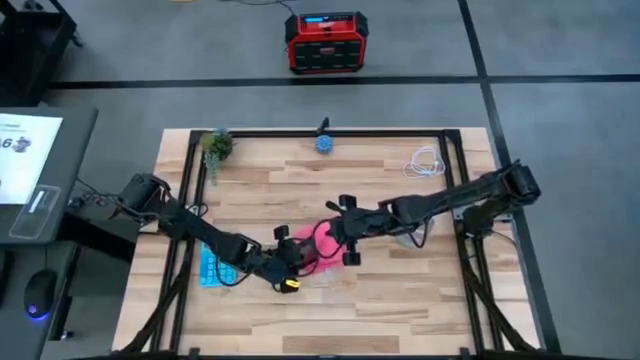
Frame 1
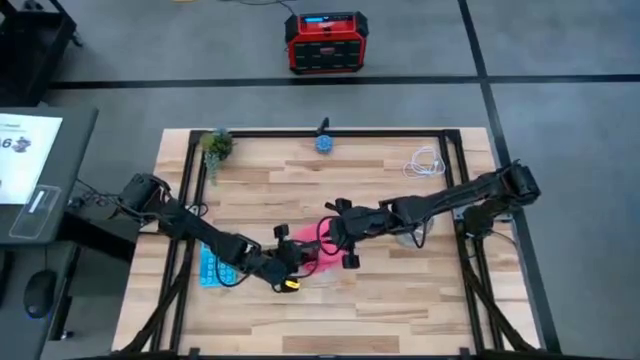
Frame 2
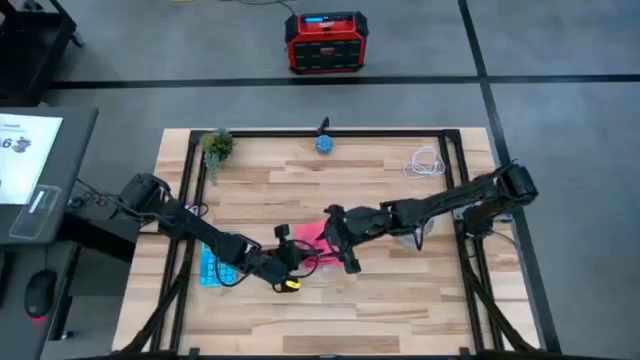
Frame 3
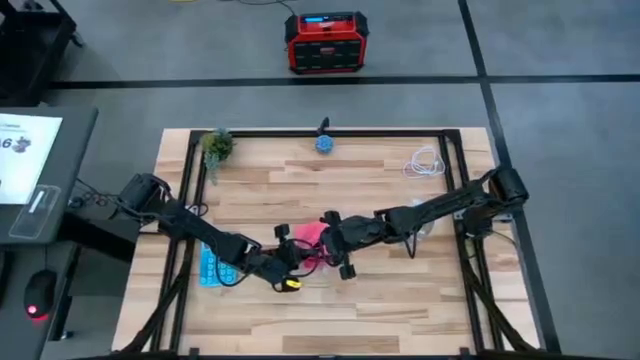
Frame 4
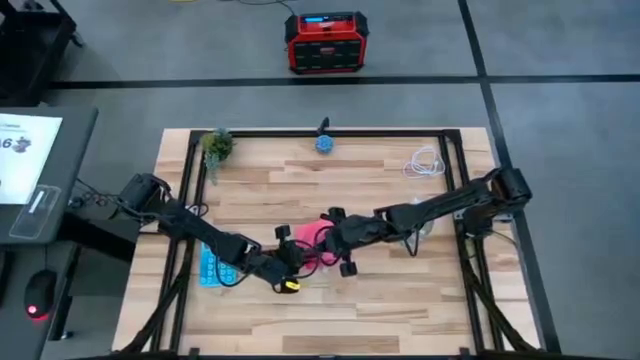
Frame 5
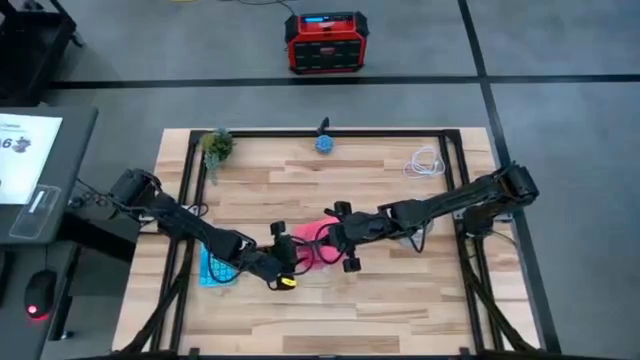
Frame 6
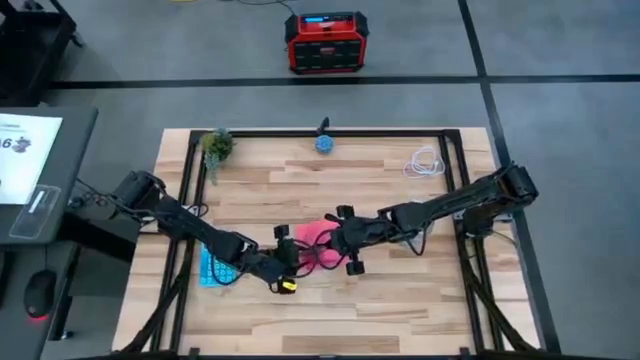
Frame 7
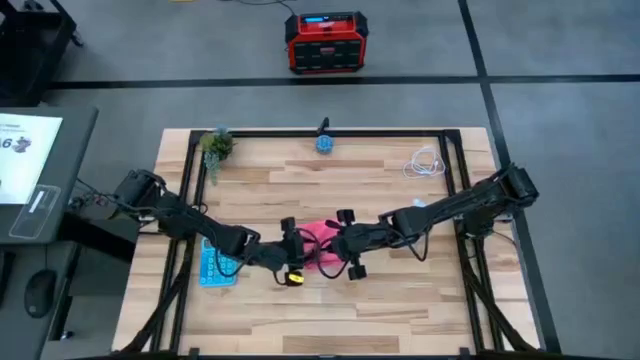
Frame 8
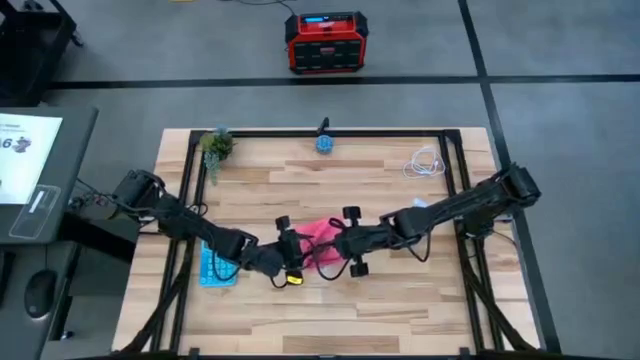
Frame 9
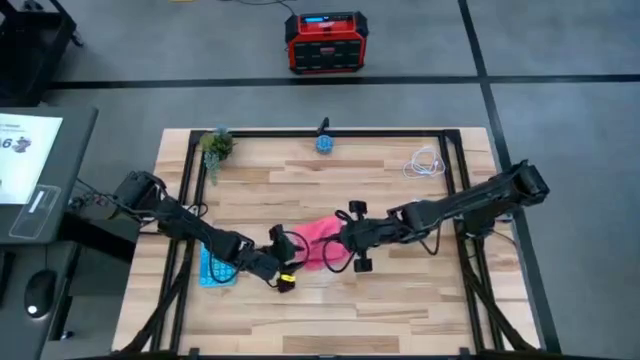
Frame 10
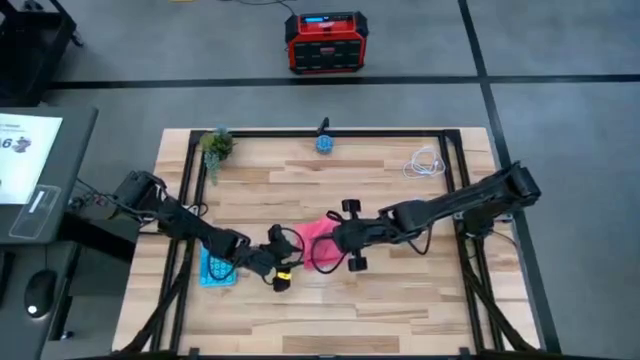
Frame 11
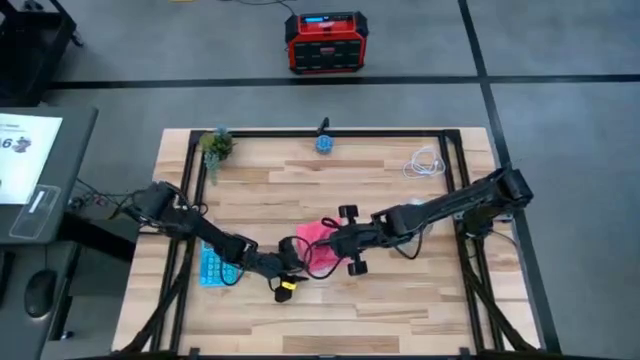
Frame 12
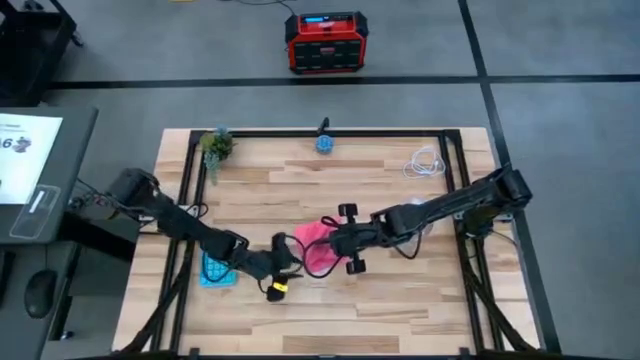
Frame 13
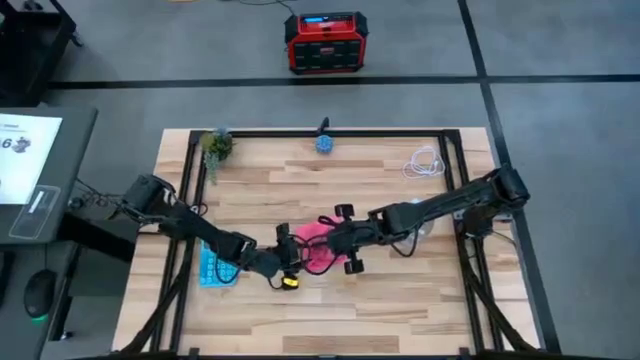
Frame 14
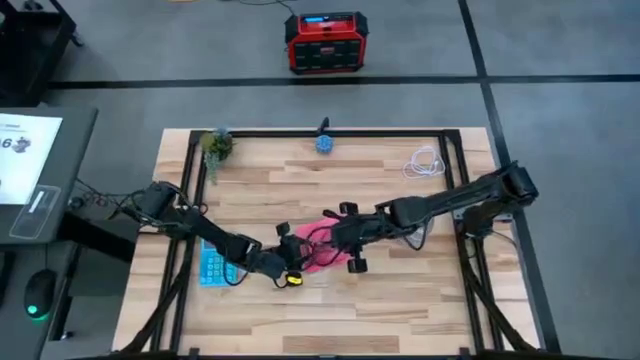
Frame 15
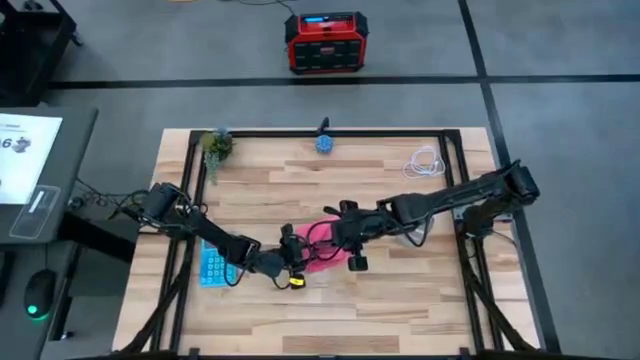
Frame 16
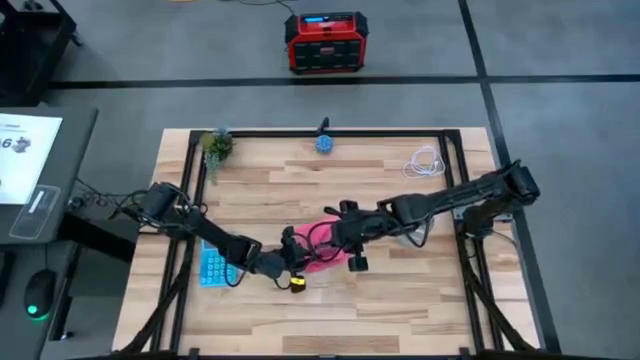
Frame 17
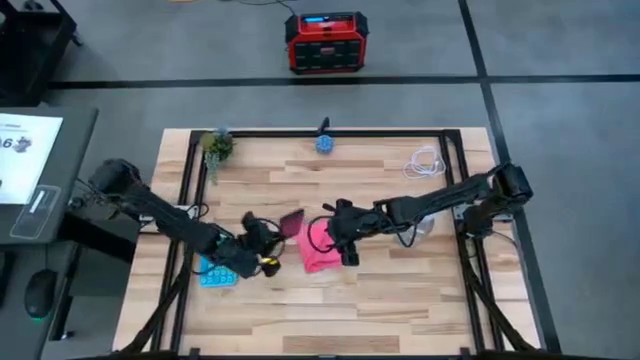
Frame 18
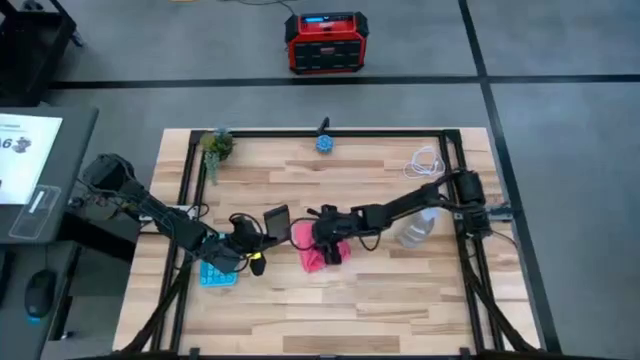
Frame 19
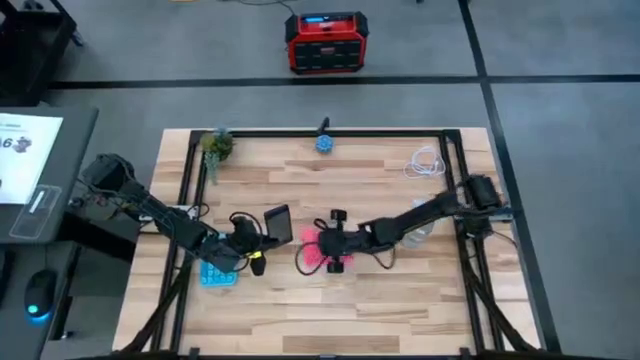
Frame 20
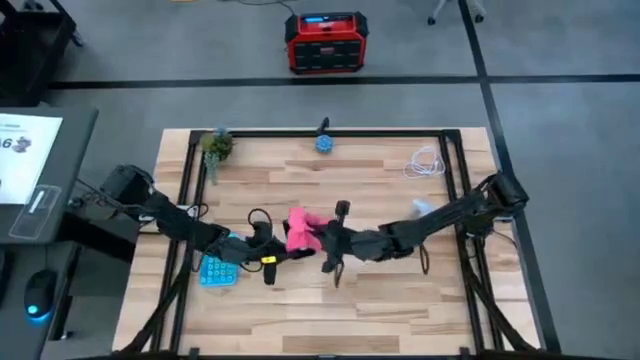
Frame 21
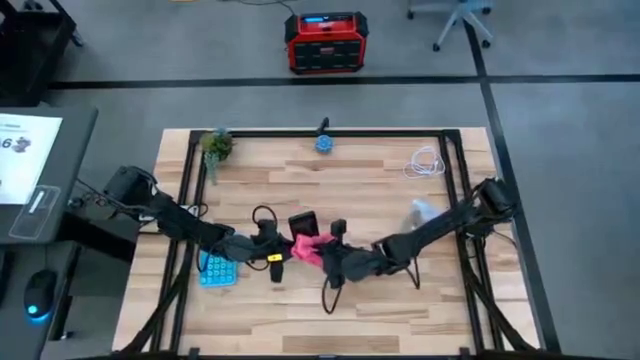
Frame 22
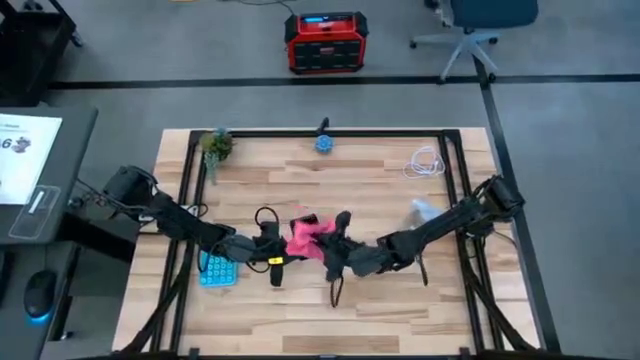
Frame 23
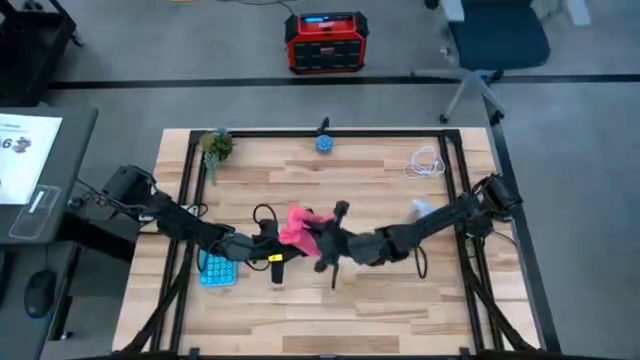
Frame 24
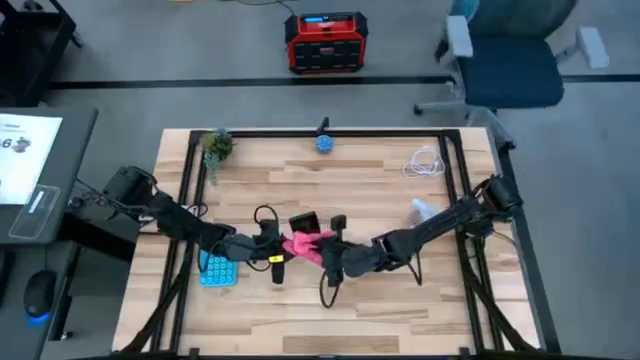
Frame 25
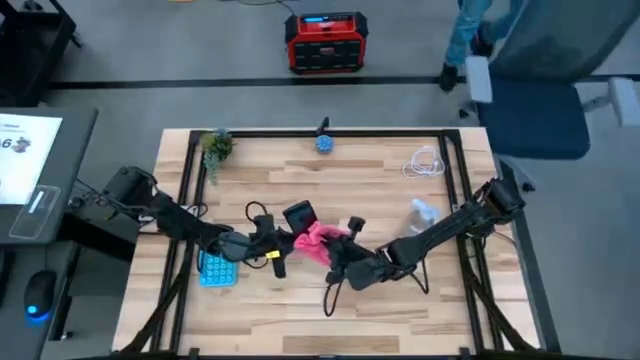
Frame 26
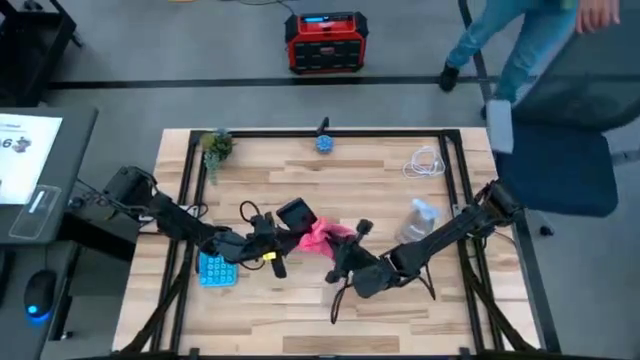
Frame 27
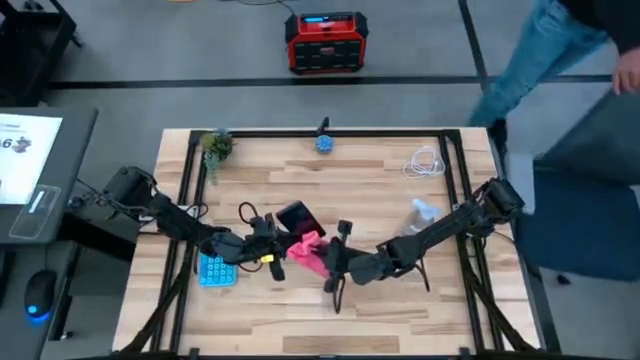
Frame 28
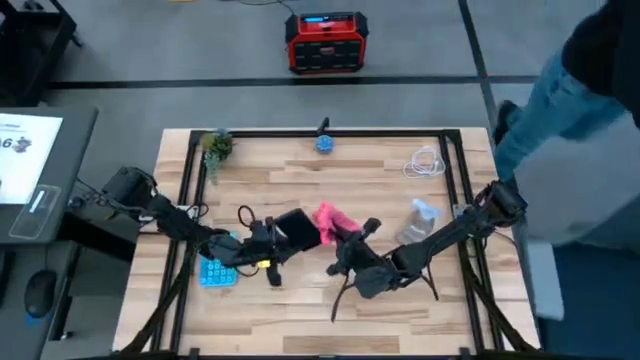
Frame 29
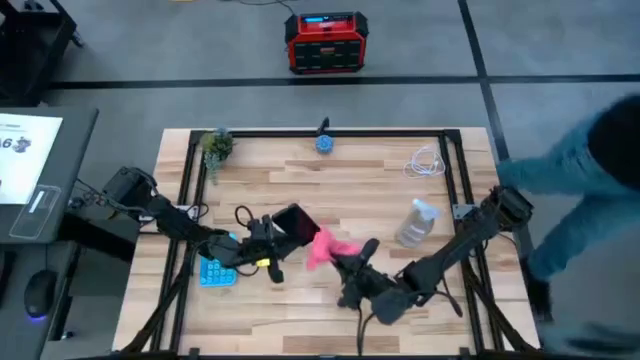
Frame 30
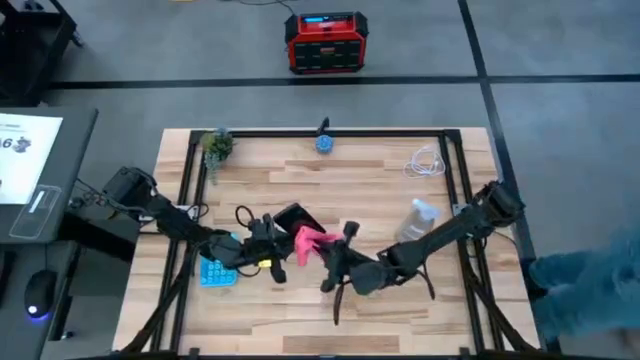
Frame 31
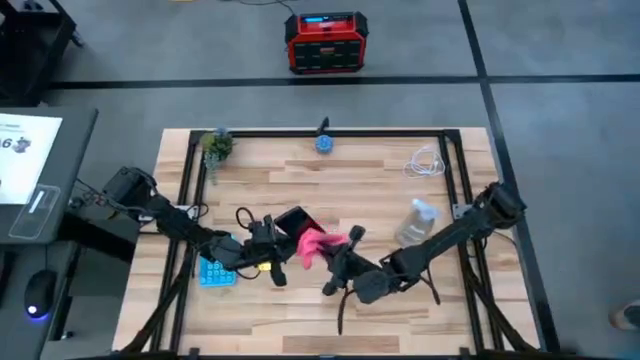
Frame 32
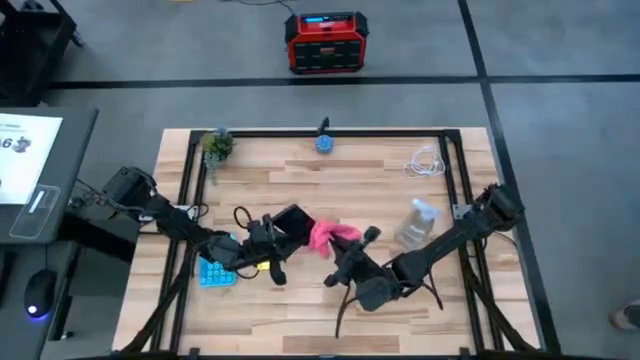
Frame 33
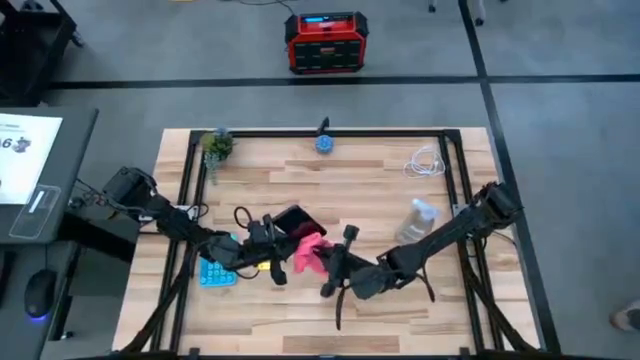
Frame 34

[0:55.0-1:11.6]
Task: Apply microfiber cloth
Wipe the front of the black cellphone using the pink microfiber cloth

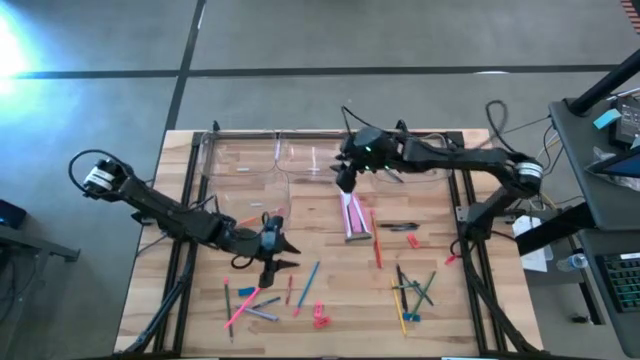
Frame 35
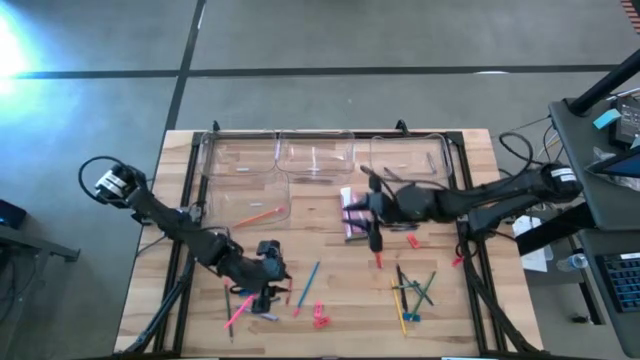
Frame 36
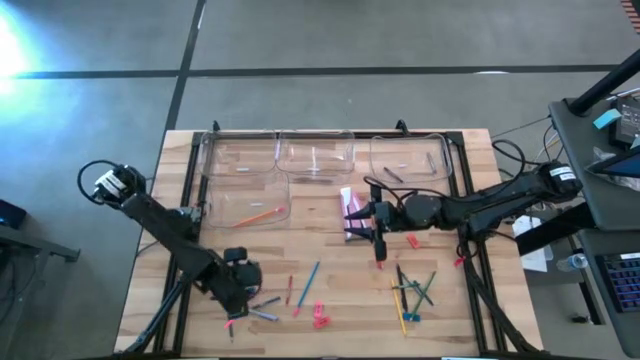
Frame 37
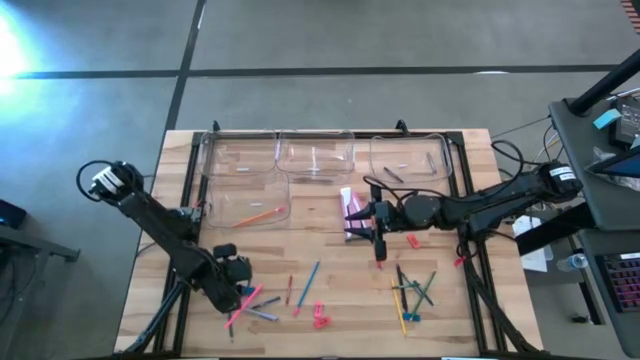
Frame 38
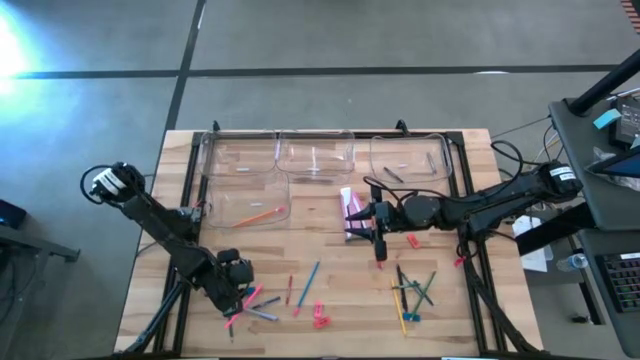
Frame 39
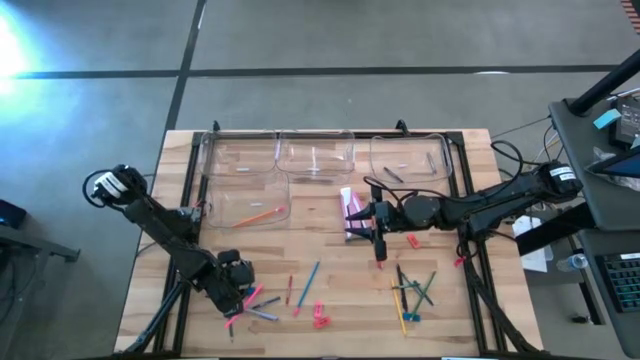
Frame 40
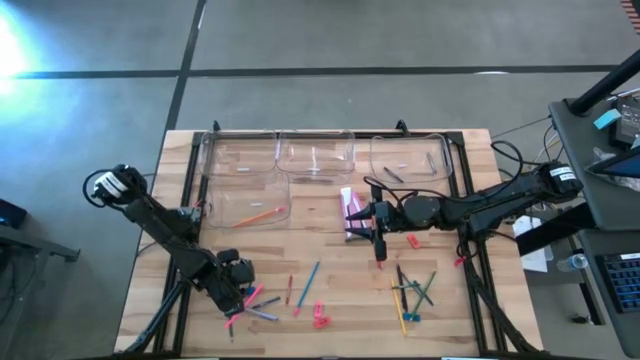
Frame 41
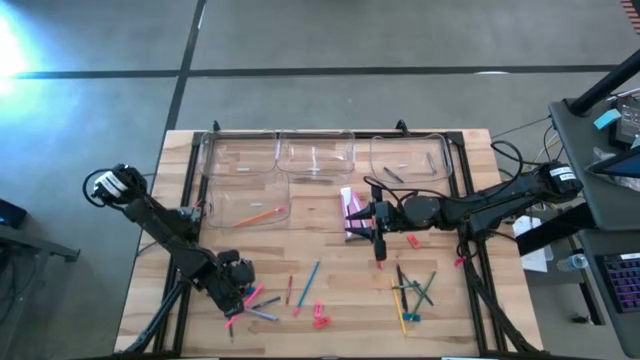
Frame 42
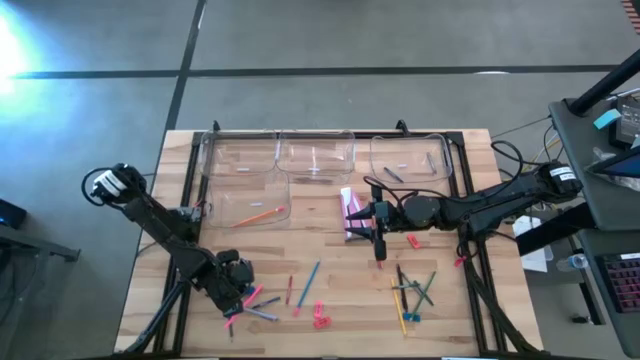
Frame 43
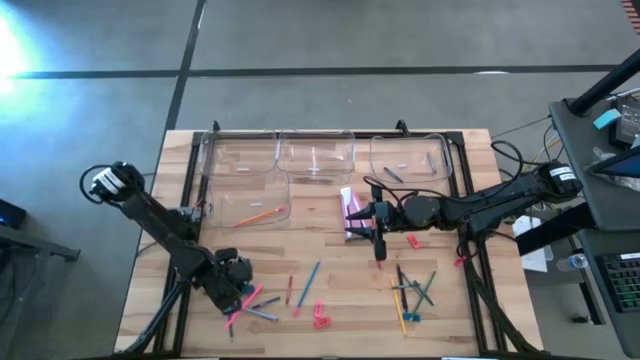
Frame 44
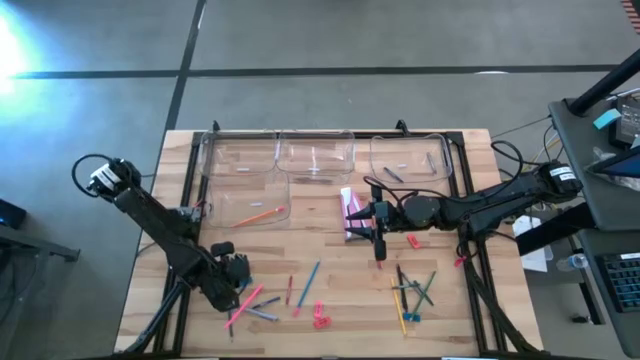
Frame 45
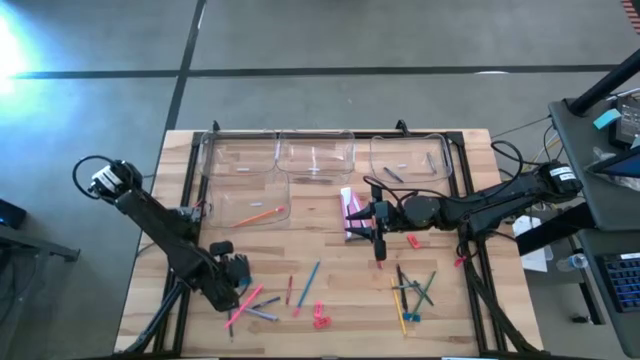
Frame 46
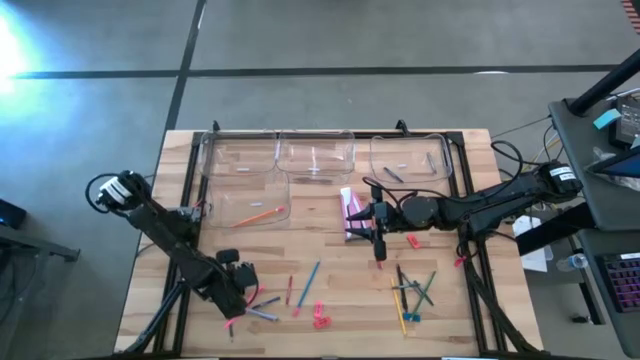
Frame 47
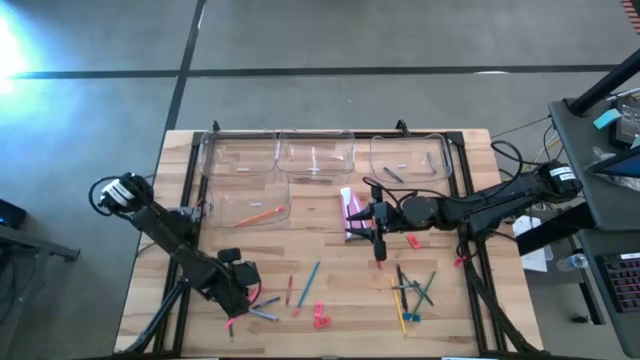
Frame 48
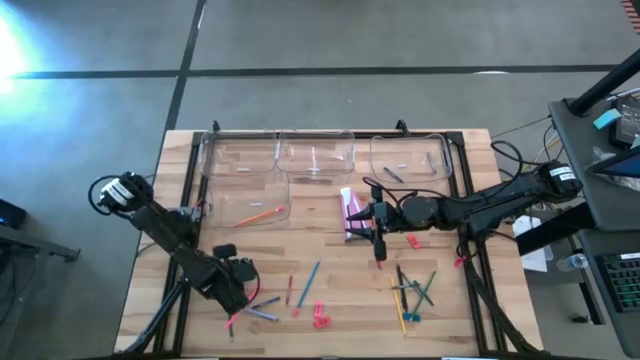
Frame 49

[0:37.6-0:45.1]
Task: Sort crayons/erasers/pens/pencils in bins
Put the blue eraser into the top left transparent bin
